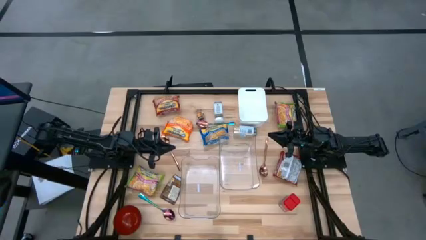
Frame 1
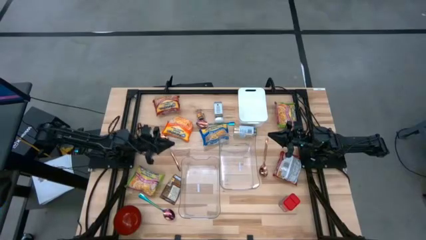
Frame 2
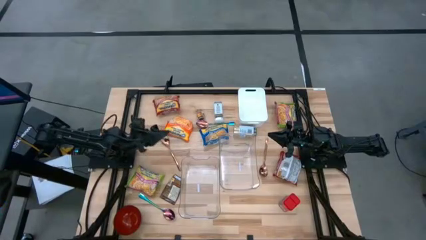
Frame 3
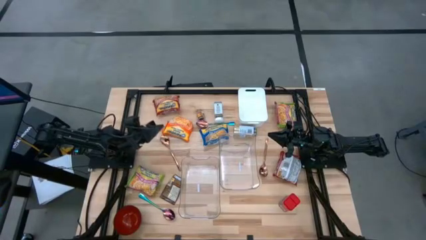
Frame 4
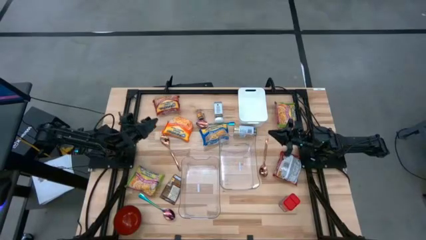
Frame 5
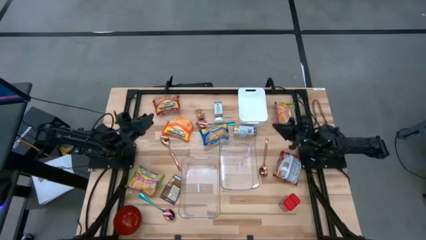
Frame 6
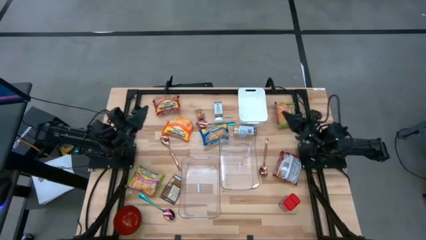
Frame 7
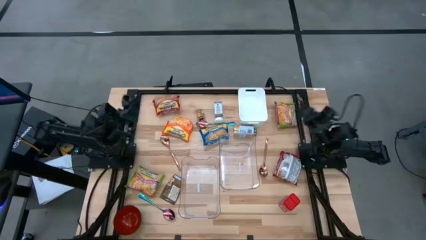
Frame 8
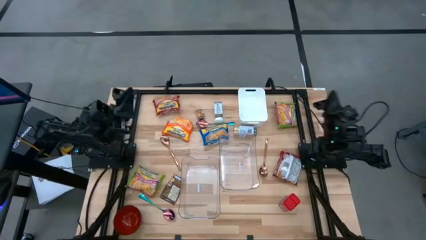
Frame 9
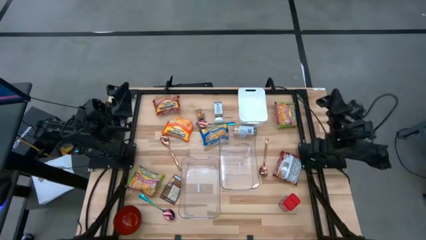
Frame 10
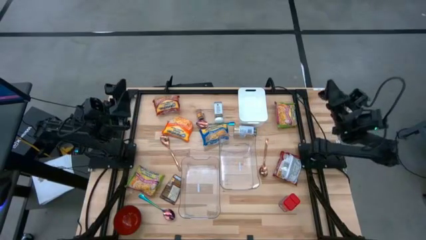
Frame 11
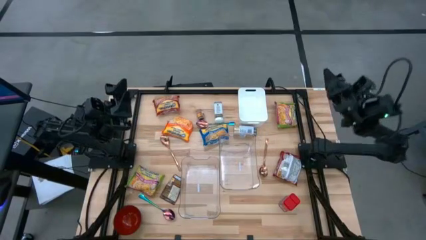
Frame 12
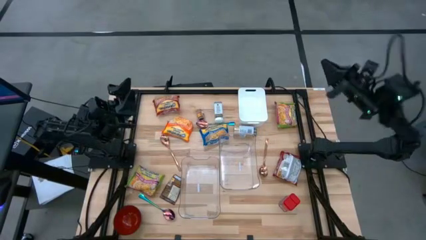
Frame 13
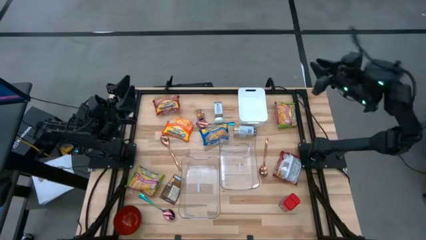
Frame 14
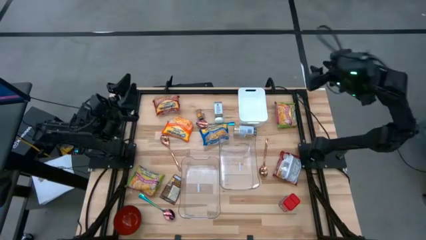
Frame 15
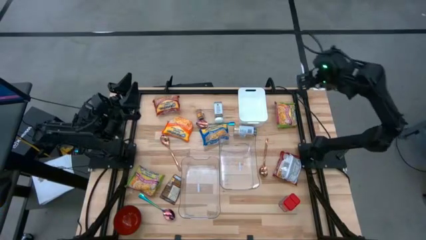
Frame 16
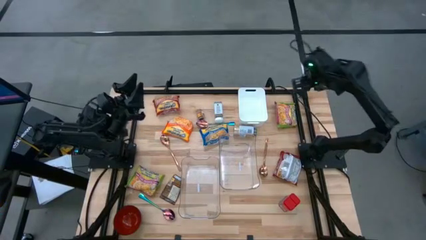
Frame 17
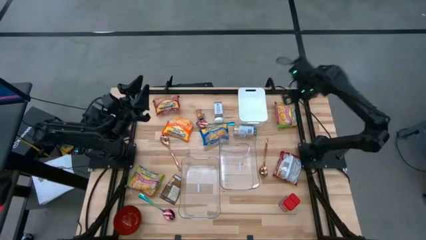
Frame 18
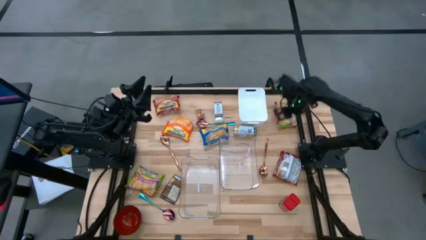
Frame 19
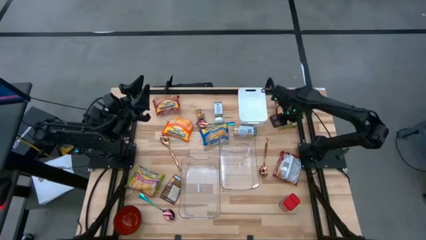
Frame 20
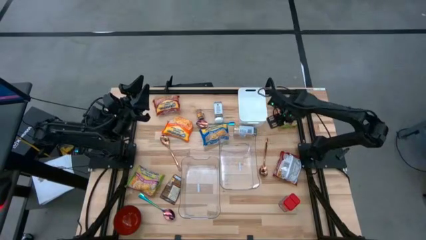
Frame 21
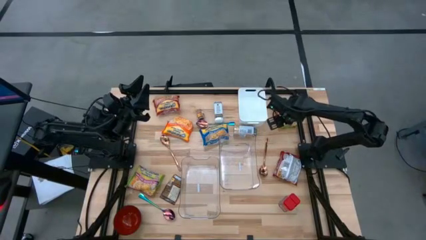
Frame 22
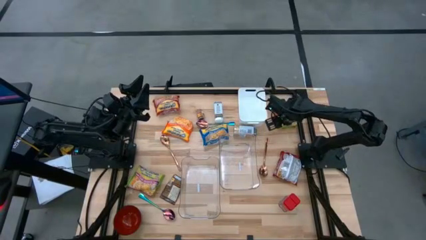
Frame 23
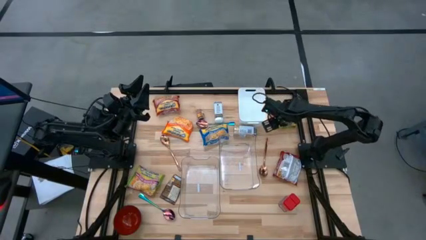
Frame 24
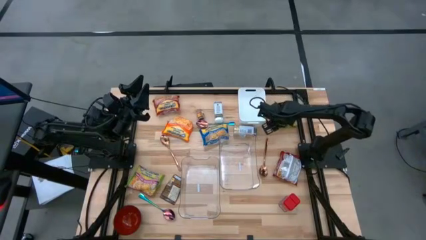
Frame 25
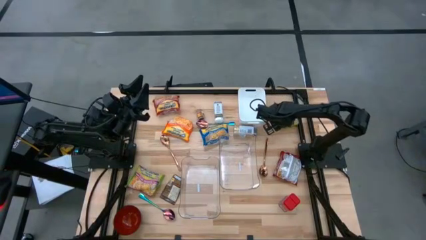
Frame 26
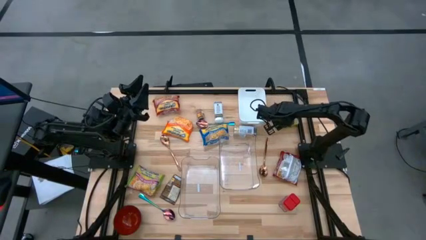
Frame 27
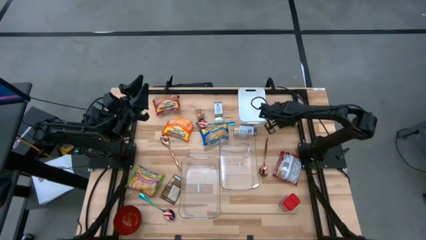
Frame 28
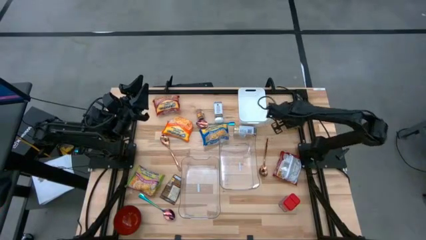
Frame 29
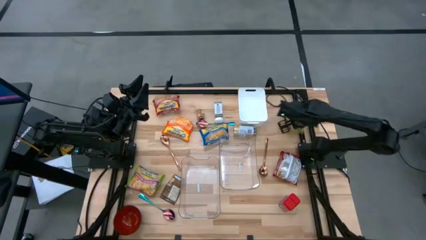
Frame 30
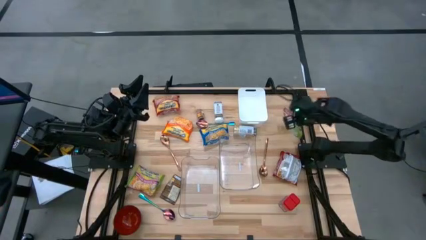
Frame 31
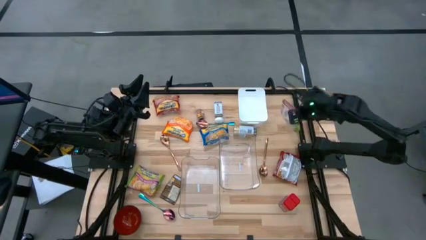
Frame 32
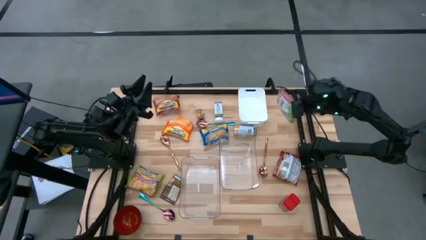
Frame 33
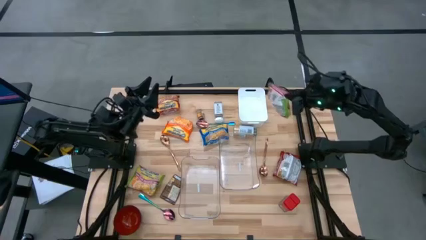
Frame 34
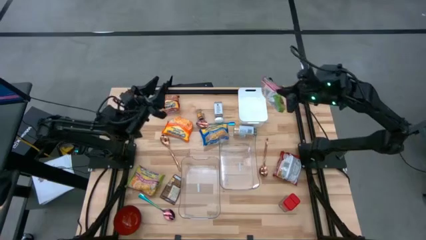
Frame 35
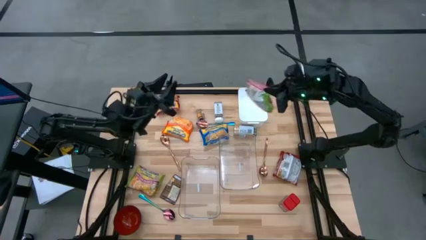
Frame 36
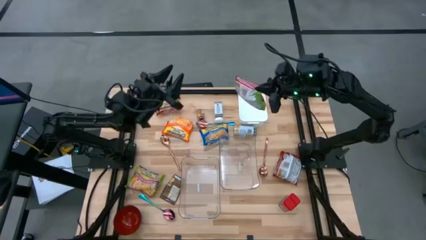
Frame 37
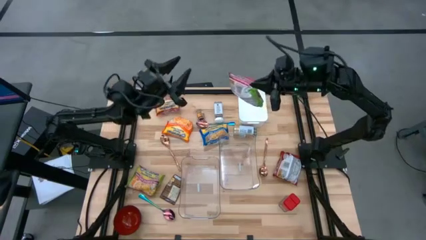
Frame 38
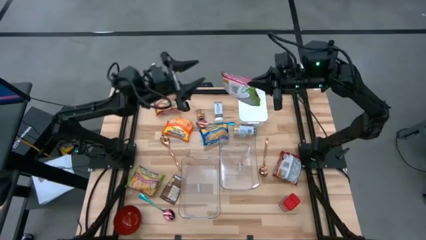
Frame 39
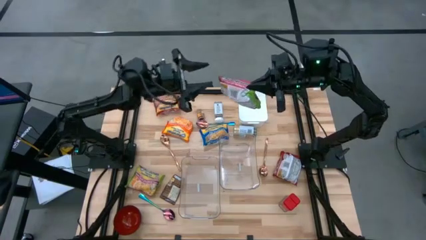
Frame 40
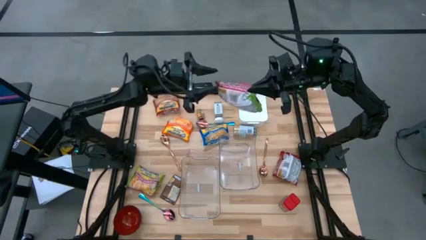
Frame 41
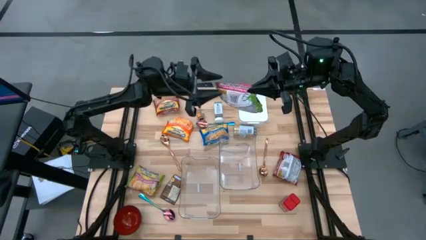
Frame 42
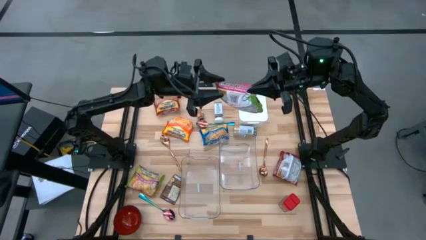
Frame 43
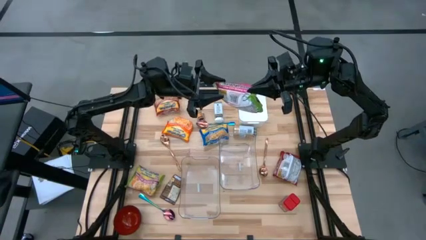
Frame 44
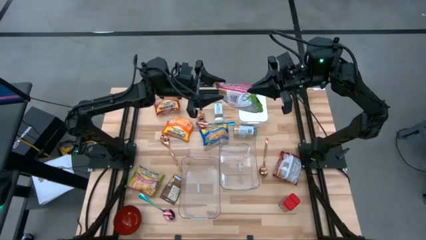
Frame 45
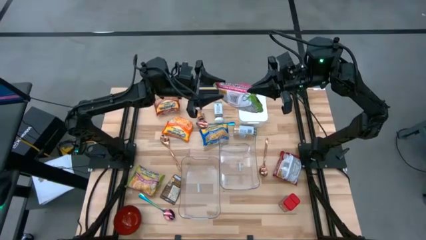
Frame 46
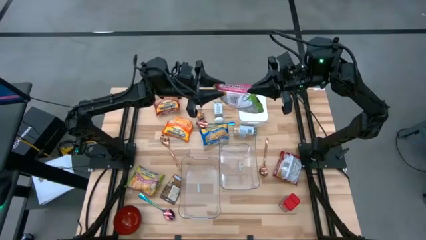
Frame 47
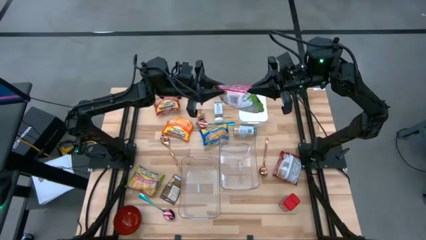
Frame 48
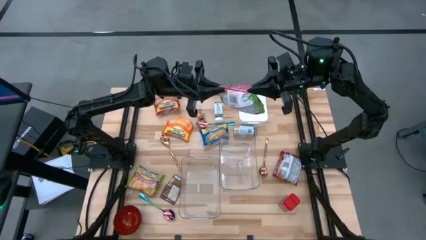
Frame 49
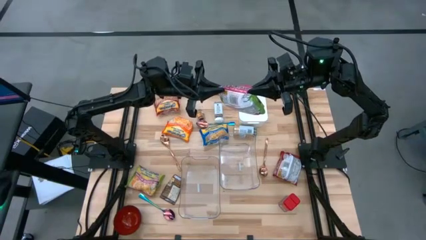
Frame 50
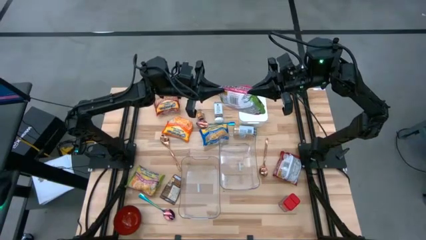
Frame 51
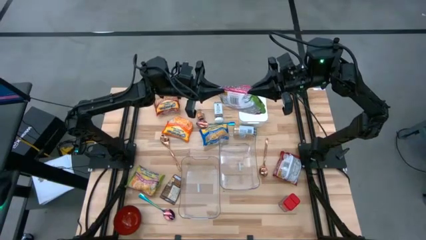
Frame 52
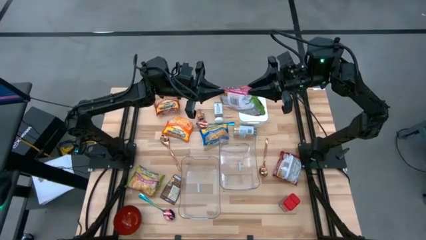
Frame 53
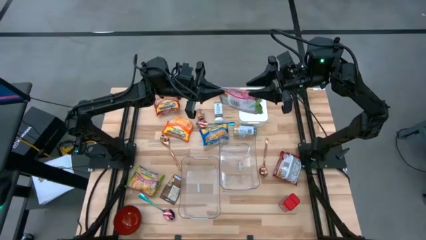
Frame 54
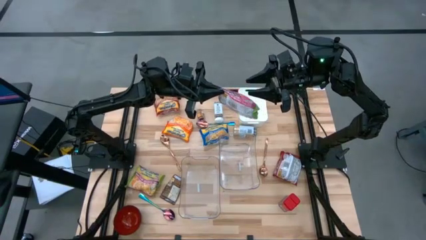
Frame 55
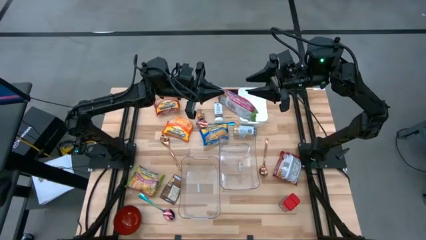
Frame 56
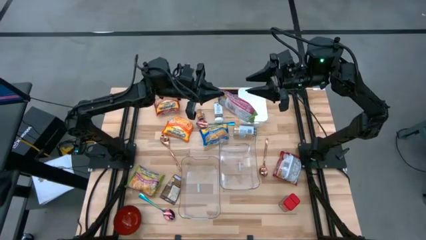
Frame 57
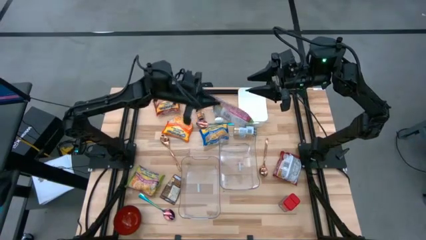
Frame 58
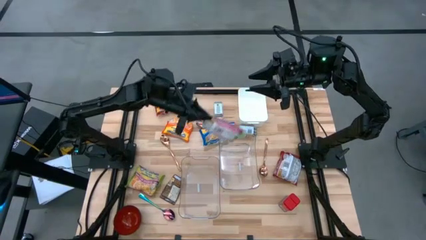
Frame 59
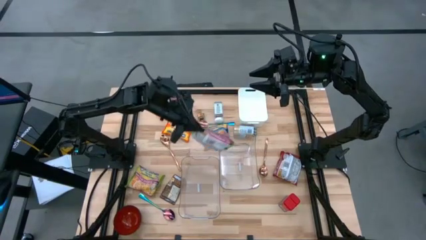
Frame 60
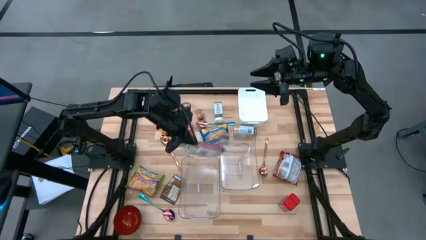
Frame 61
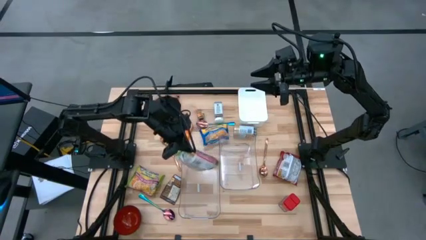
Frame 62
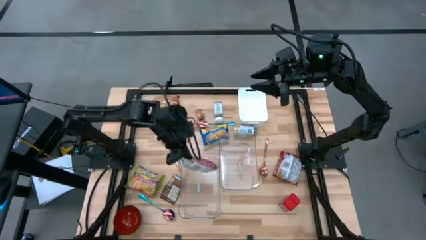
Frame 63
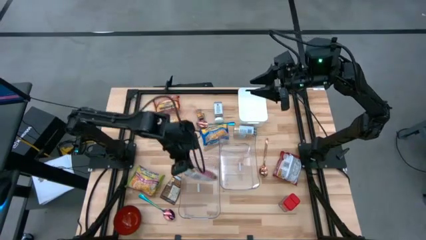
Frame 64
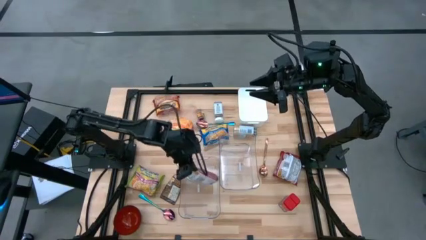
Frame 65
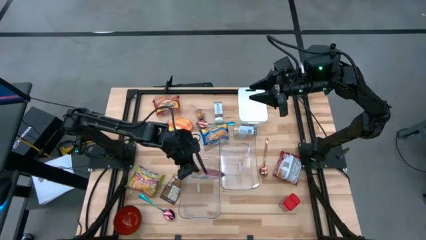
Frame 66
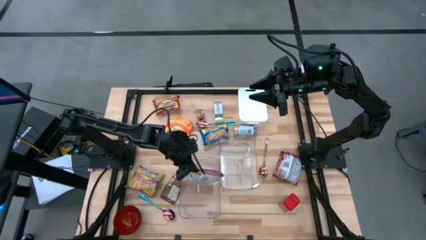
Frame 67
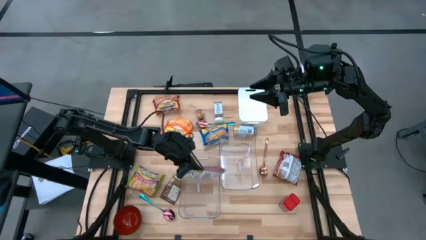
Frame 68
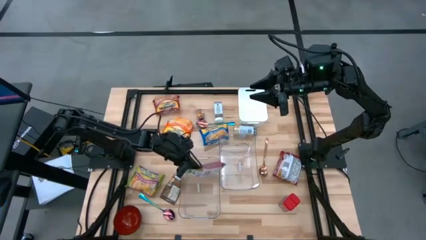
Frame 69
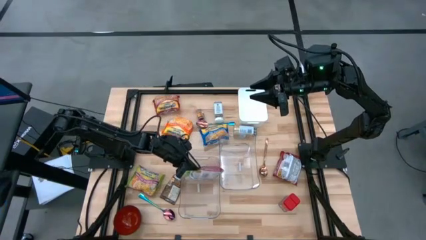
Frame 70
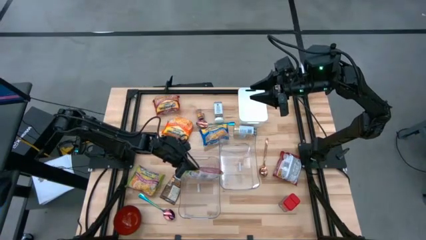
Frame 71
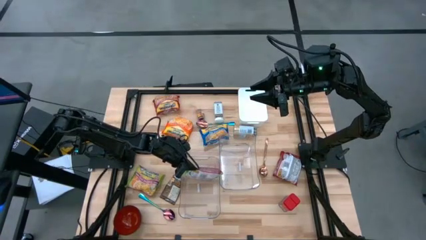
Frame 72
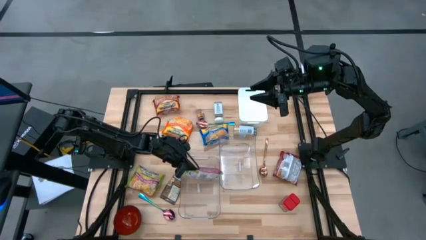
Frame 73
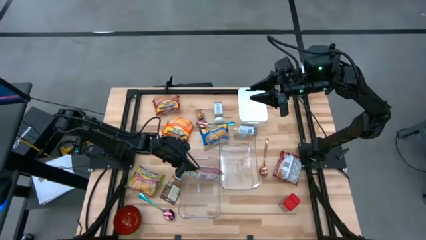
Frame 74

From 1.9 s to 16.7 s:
Task: Pick & Place Food Item
Put the top right green noodle pack into the left transparent bin
